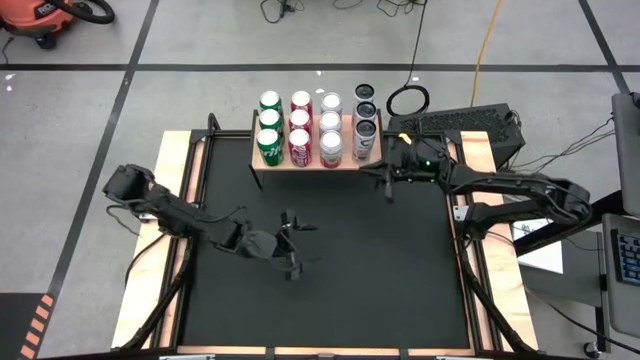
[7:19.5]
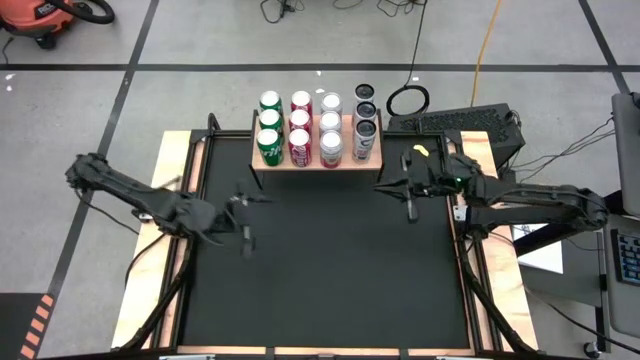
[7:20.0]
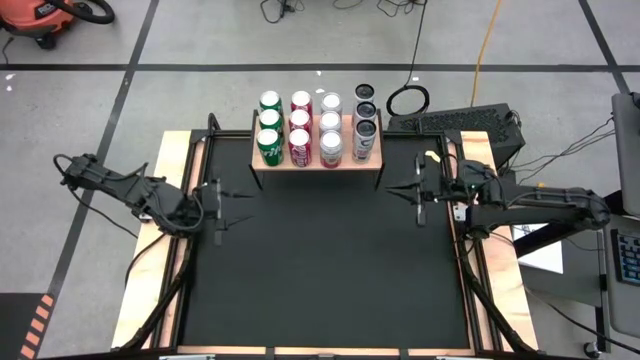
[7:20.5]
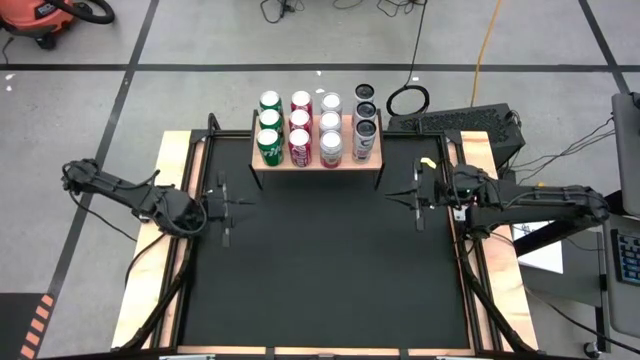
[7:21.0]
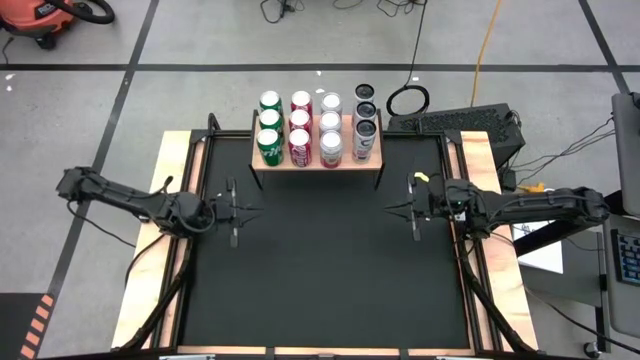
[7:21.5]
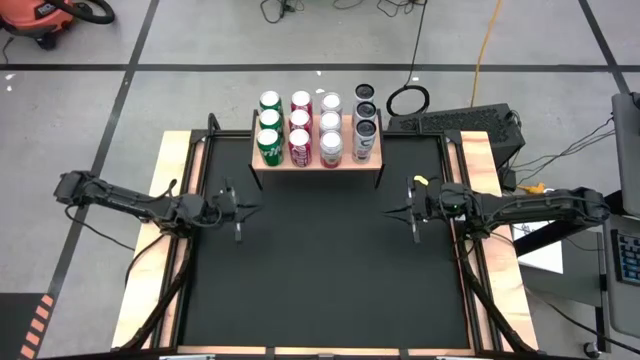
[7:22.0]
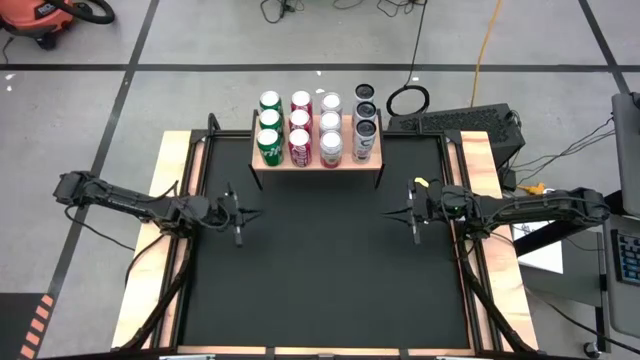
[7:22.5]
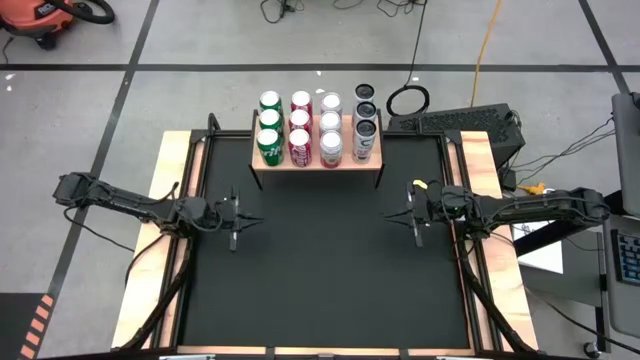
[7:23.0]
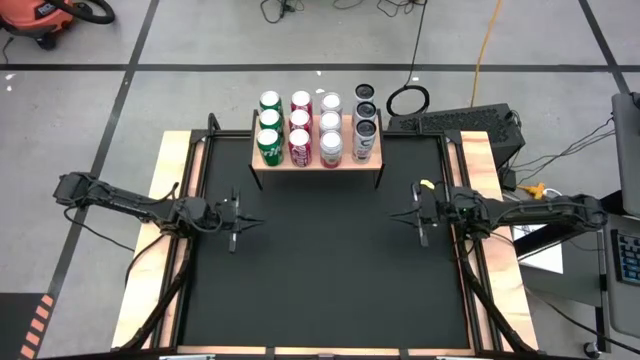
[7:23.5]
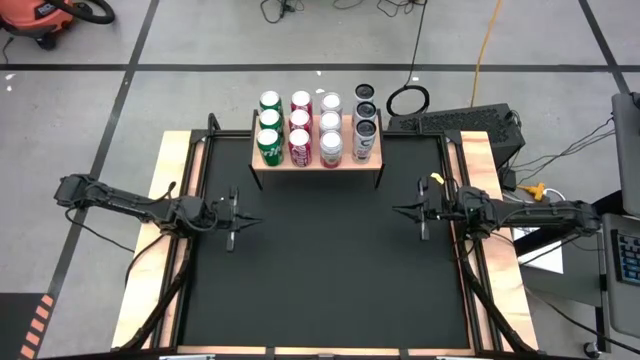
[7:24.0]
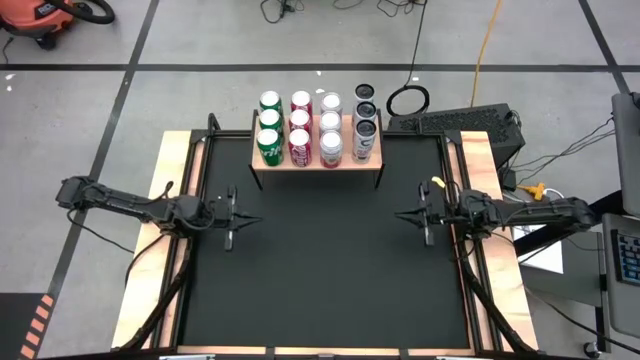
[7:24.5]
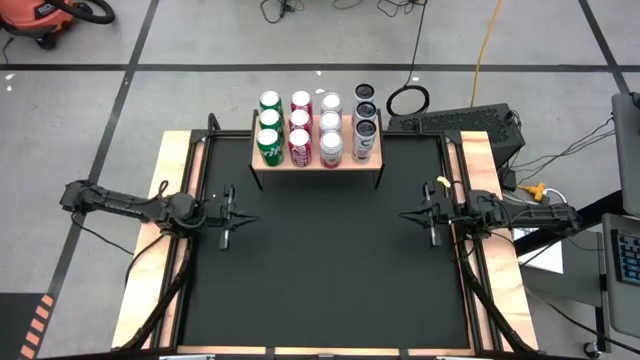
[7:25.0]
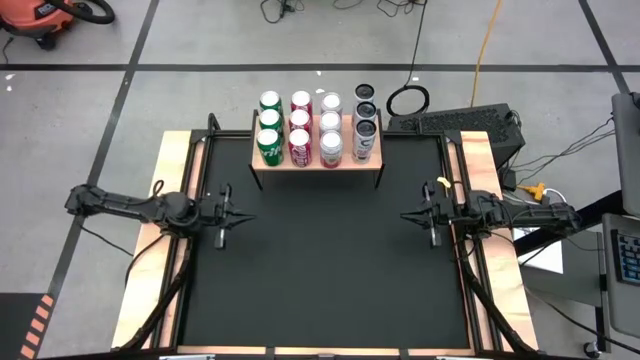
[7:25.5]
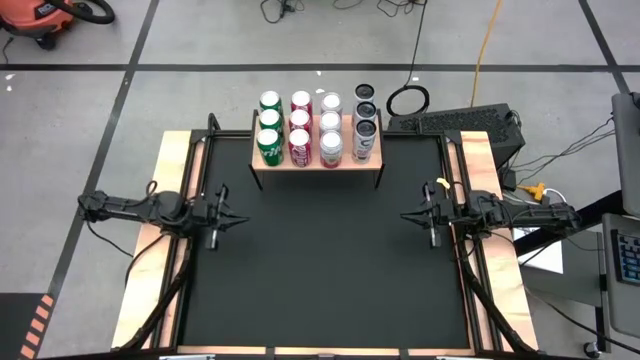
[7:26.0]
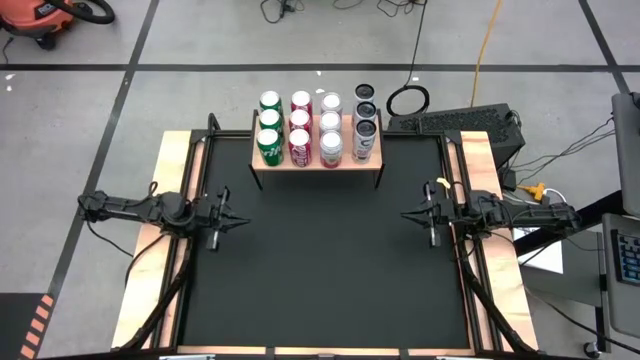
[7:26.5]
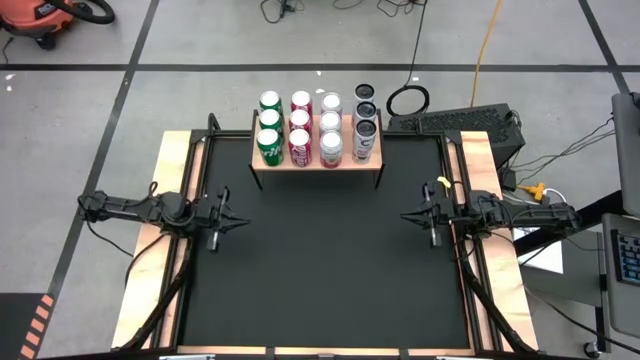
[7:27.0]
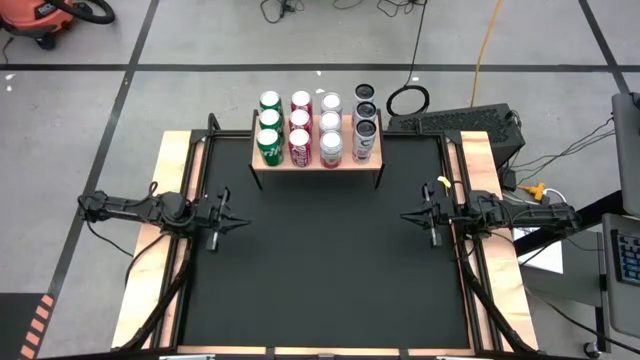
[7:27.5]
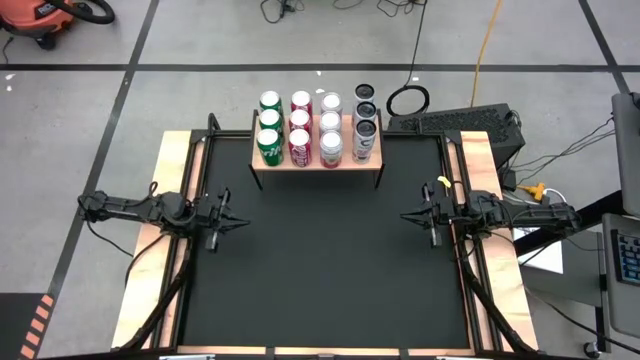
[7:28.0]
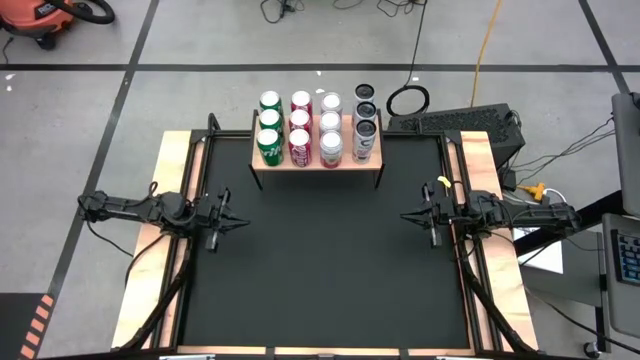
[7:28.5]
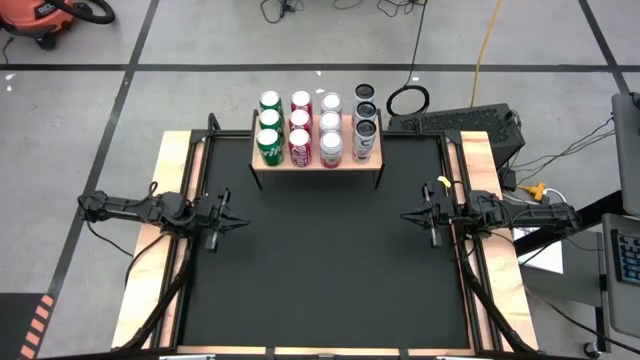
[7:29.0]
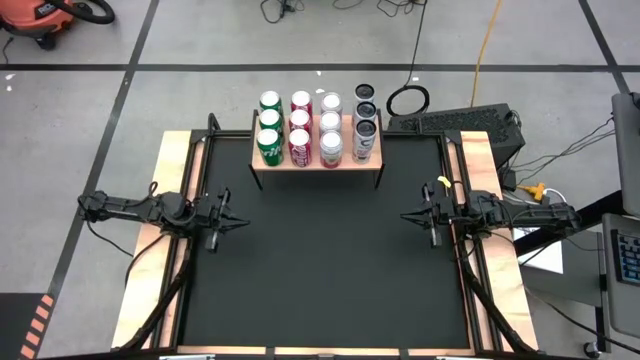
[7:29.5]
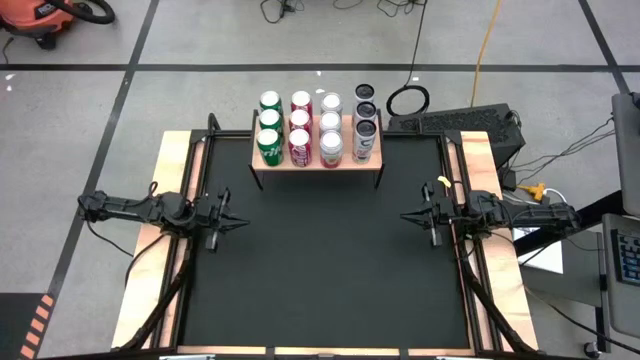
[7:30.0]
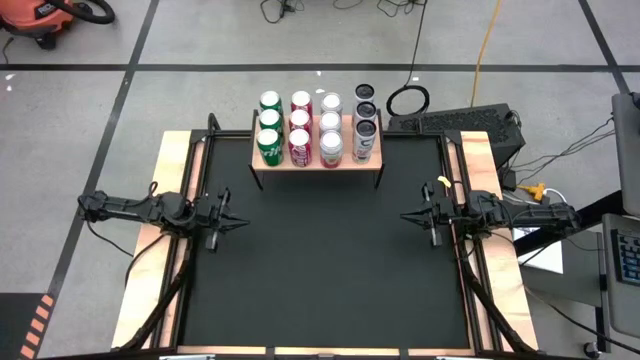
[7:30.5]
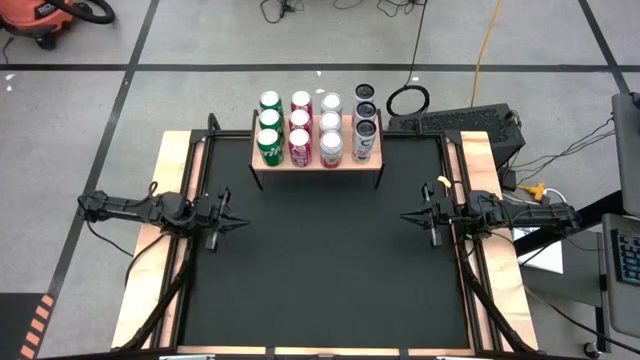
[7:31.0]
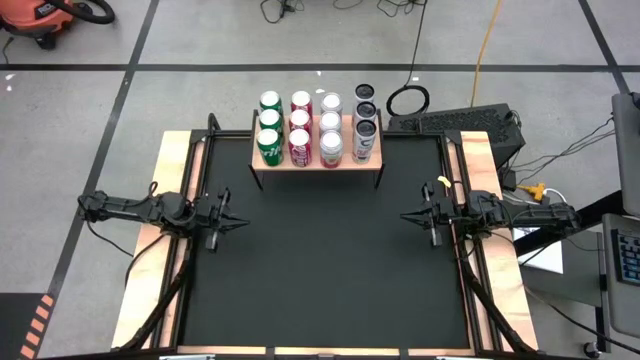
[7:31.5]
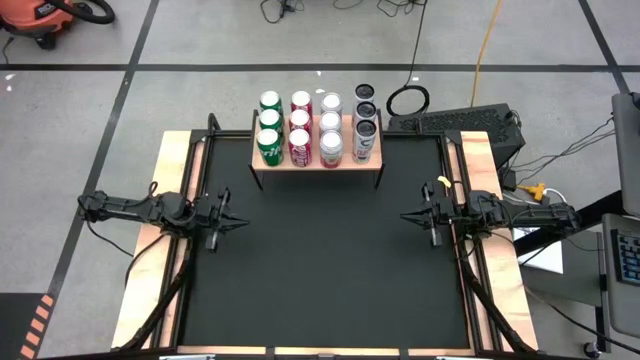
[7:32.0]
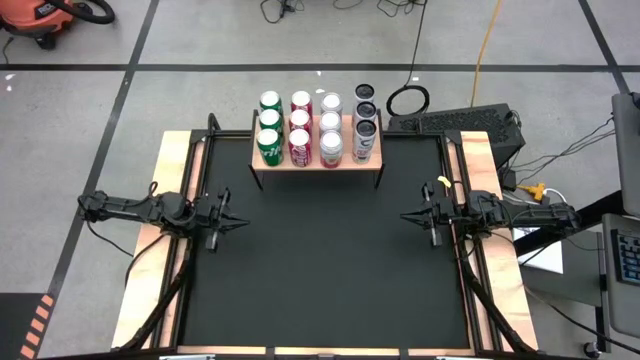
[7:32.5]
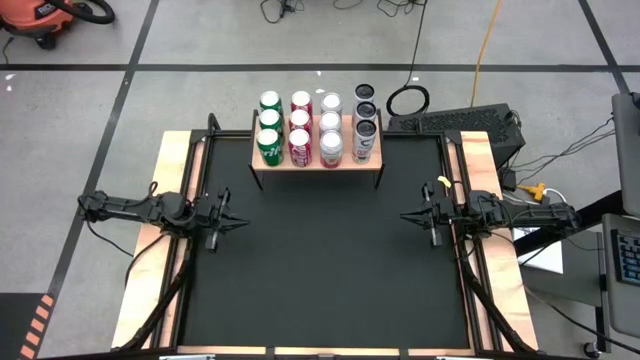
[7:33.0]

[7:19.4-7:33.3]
Task: Place canned beverage on shelf
Return to Home Position

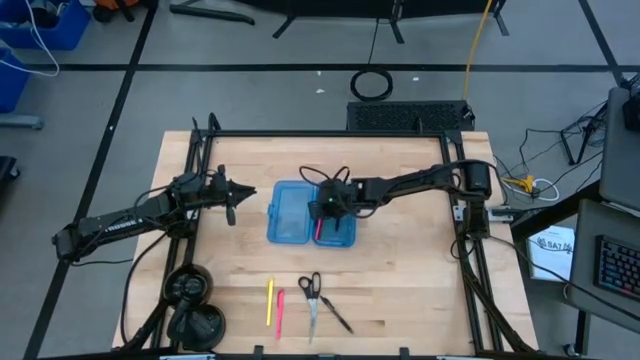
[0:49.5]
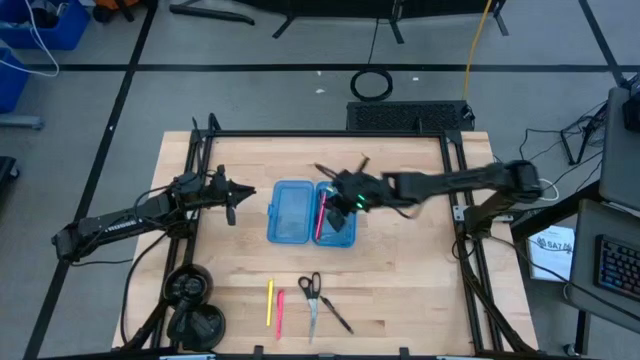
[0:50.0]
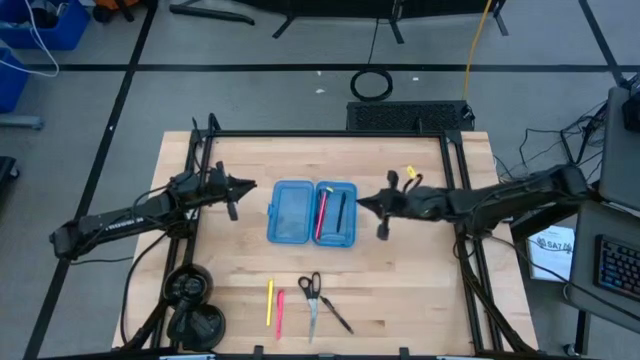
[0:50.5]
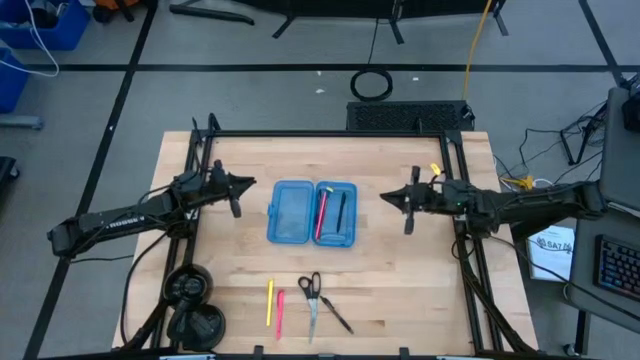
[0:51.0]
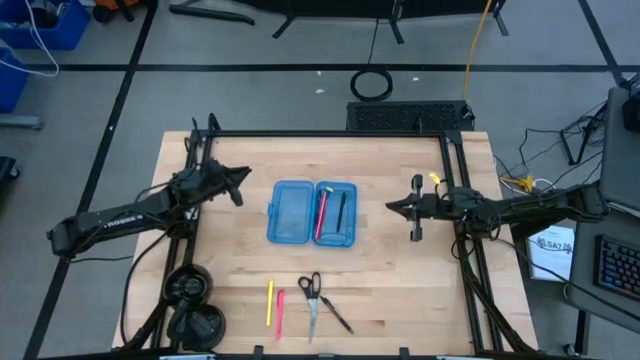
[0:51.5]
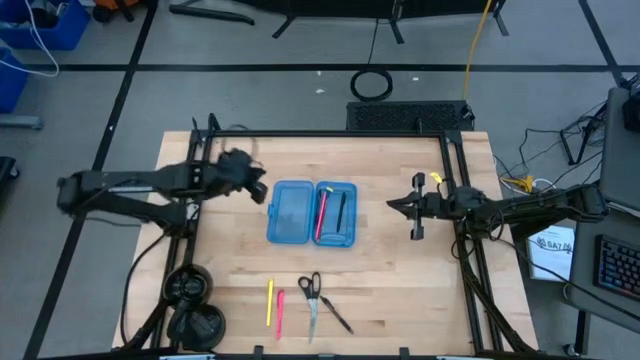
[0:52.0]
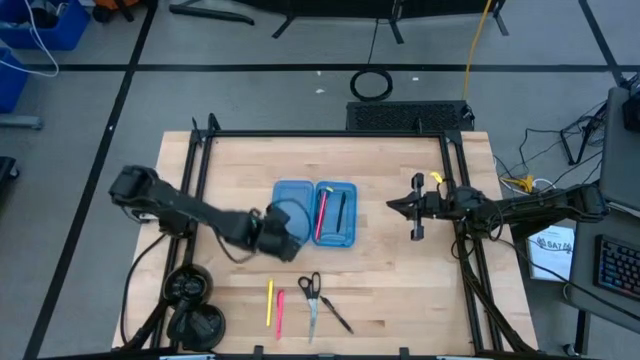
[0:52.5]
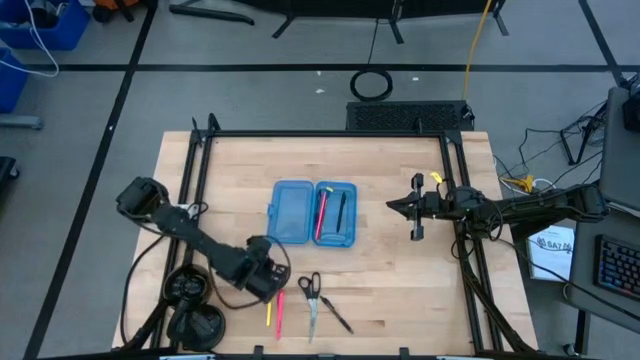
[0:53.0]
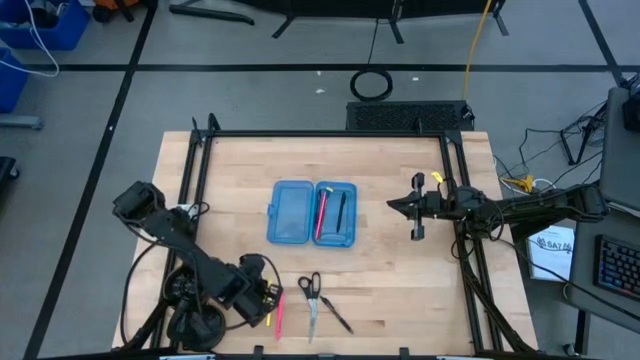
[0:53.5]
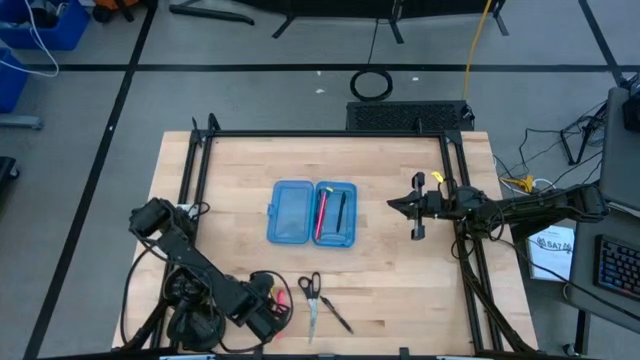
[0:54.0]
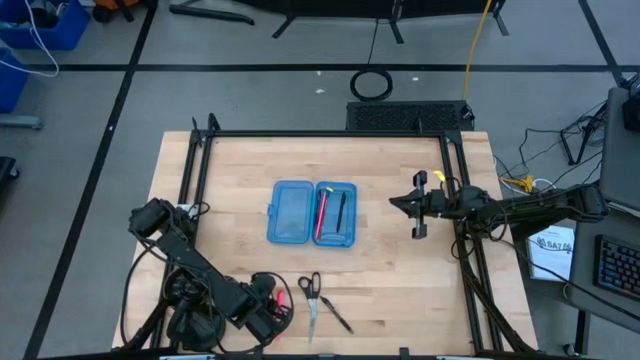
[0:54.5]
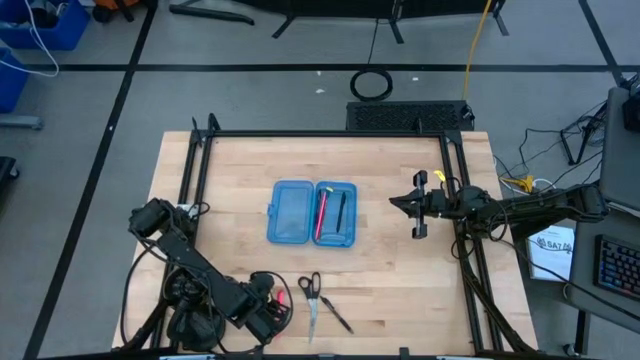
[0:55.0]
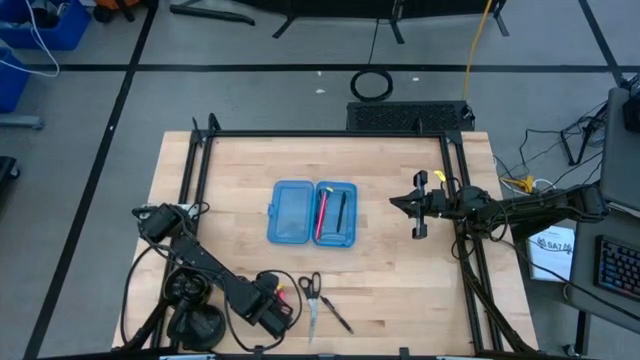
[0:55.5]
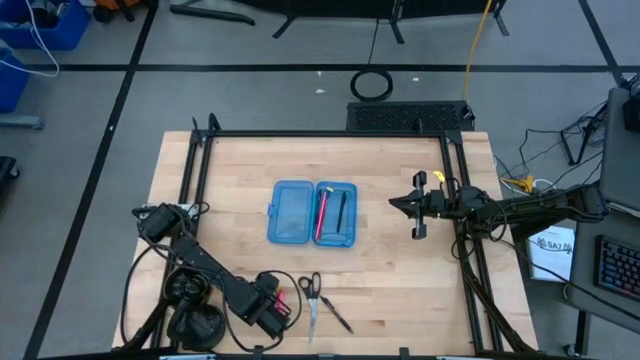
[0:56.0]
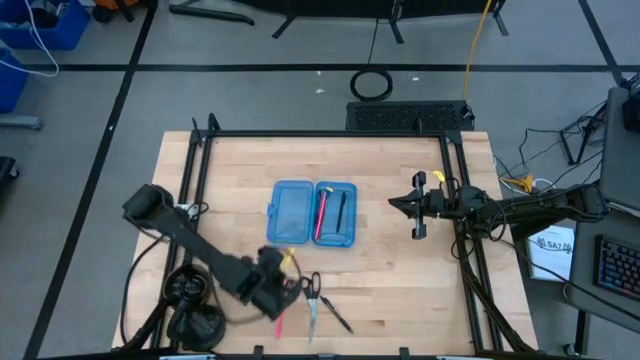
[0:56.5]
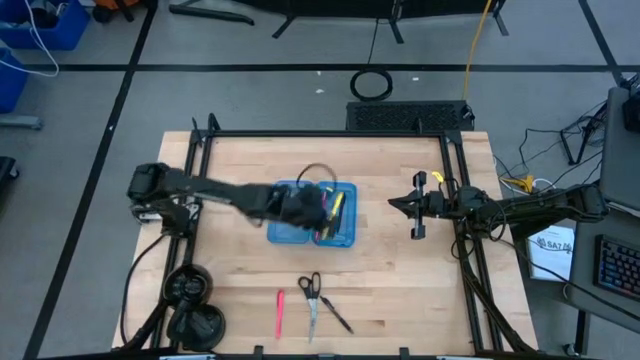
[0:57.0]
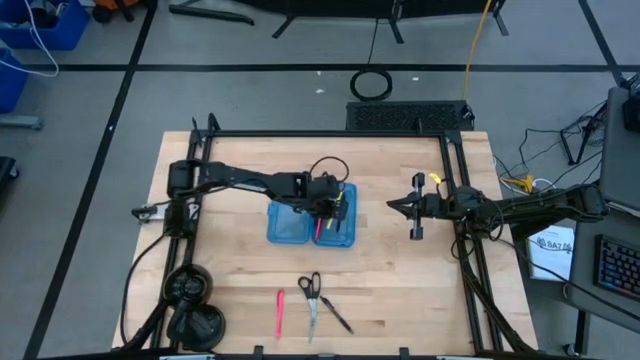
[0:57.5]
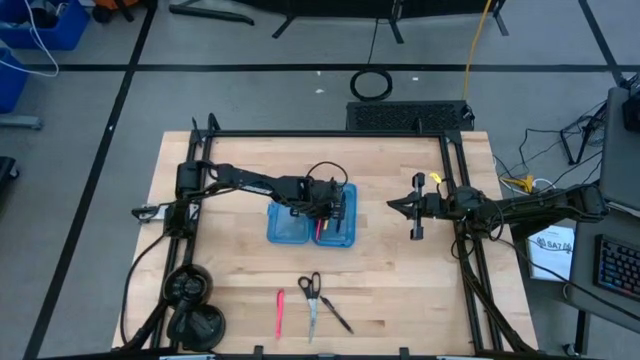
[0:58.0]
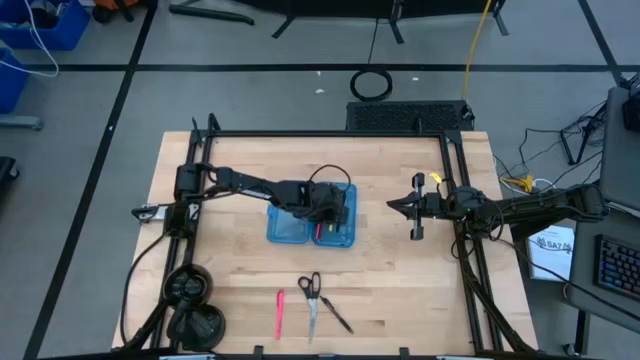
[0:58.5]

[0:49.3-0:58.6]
Task: Pick & place school supplies into a supply box
Put the yellow pen into the blue supply box
